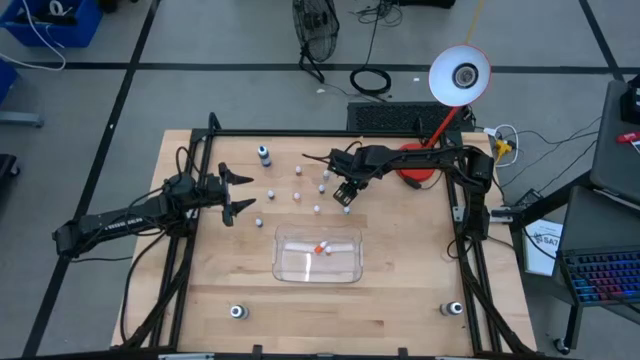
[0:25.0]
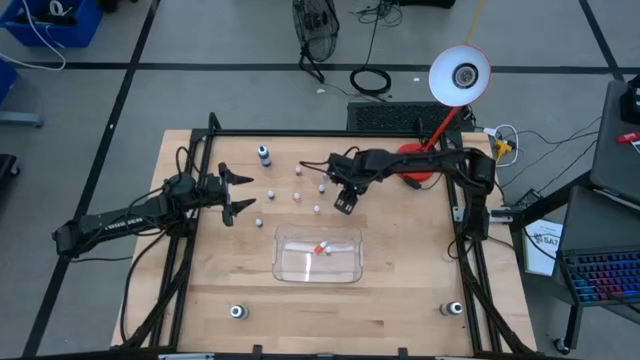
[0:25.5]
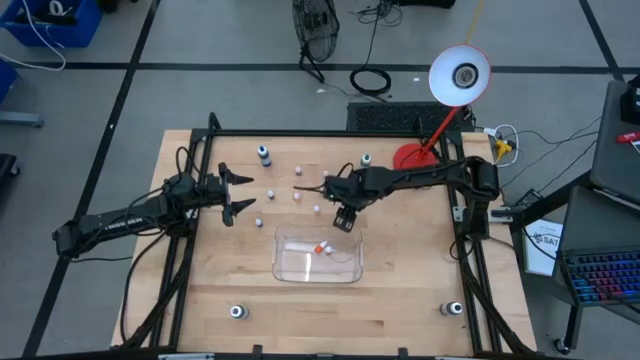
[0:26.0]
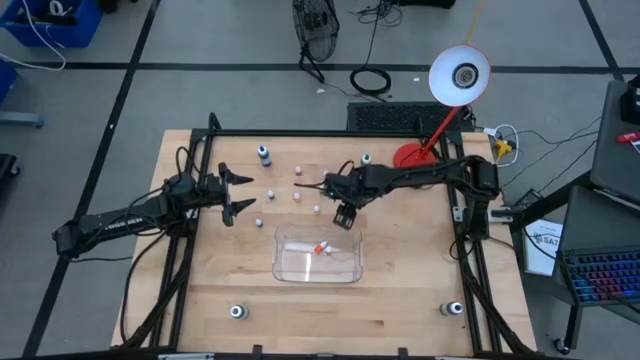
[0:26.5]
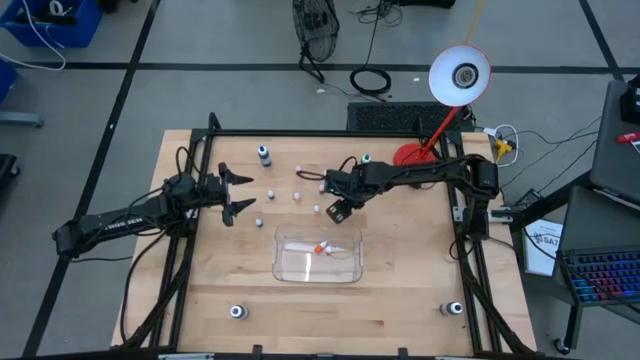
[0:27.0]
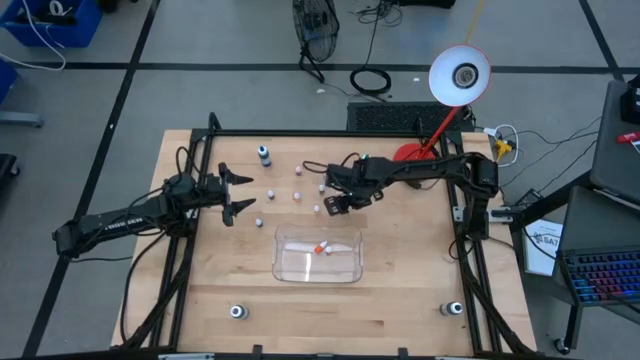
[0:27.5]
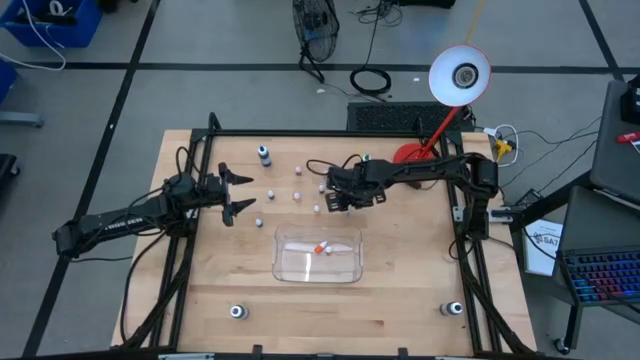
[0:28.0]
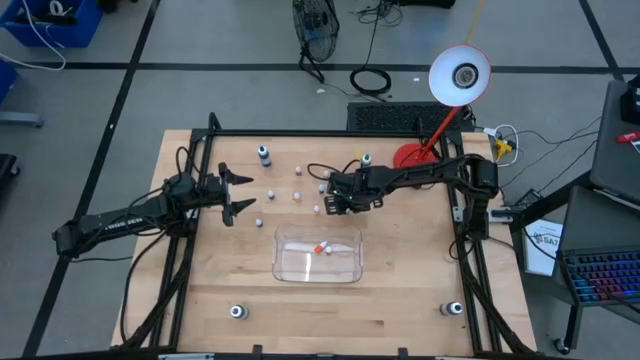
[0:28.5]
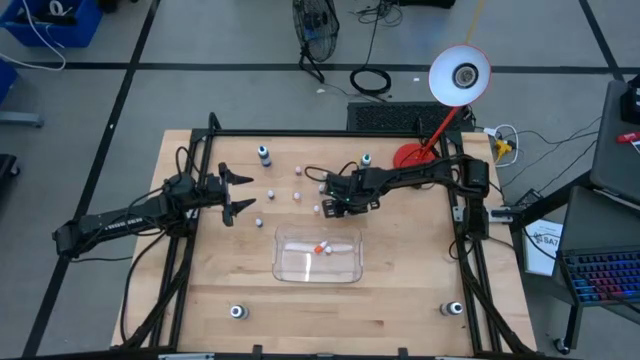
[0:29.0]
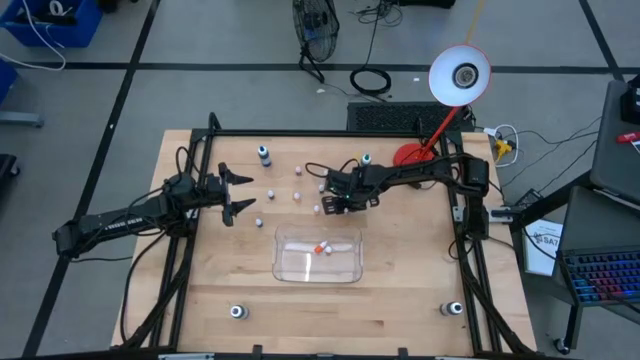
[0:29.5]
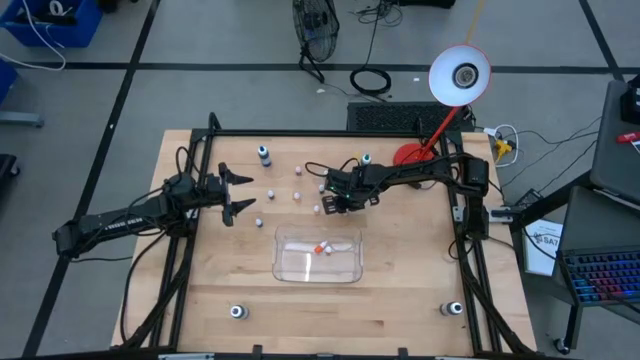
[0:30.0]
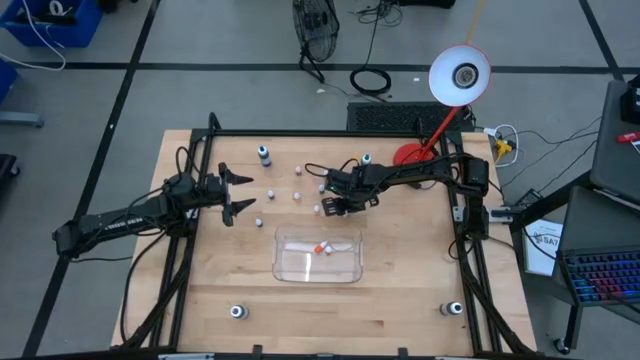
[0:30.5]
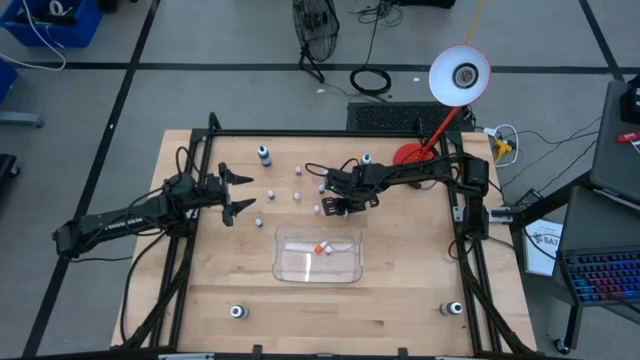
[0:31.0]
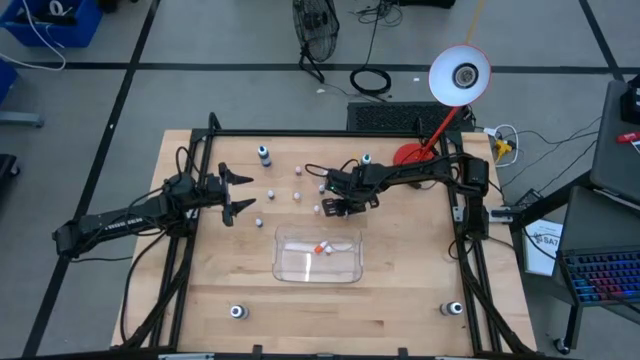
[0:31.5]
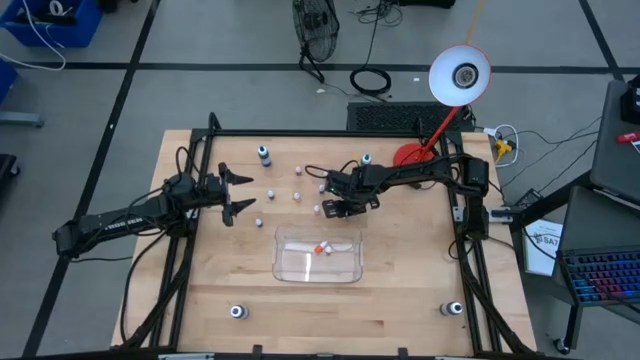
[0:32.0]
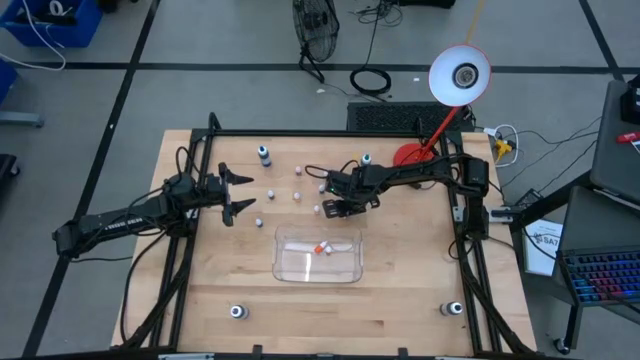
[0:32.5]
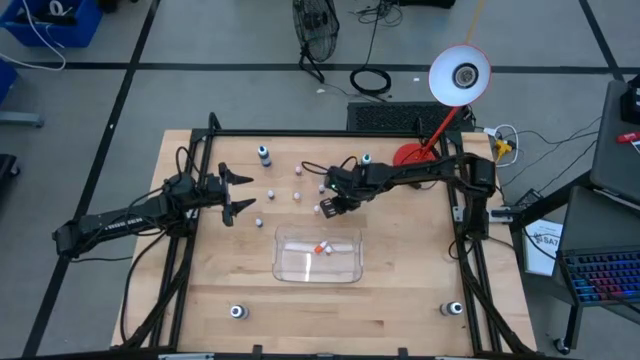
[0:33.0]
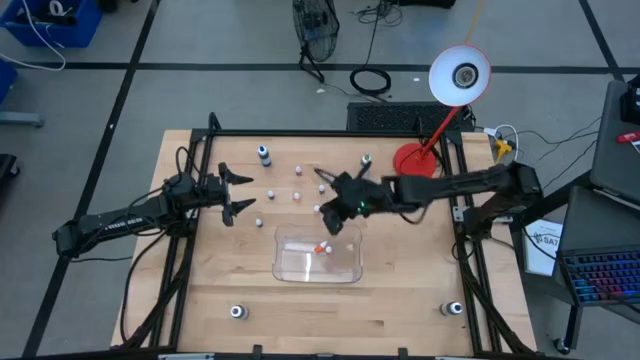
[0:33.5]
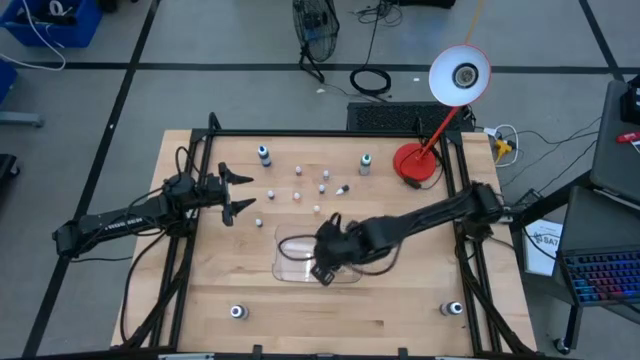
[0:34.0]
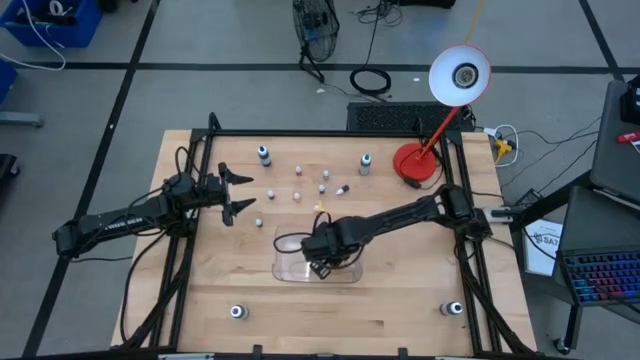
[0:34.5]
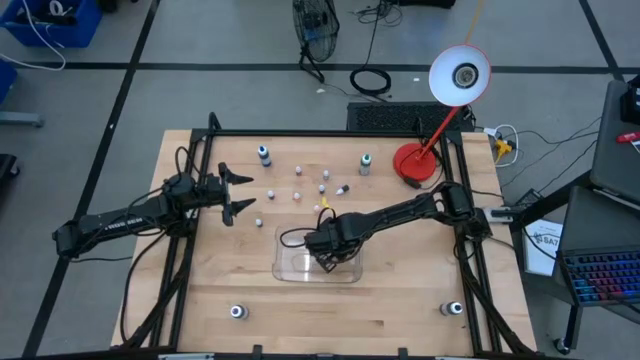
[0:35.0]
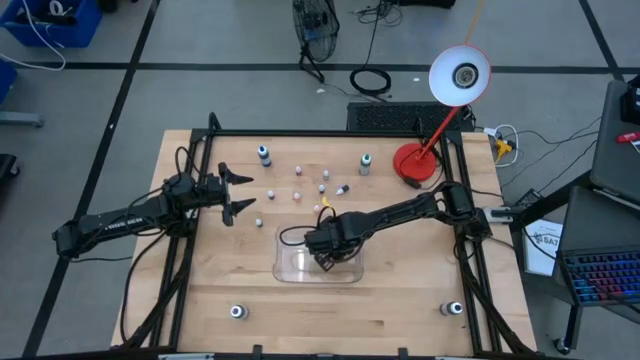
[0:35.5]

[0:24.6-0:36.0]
Task: Pick & Place food coloring
Put the small violet ood coloring bottle into the transparent bin

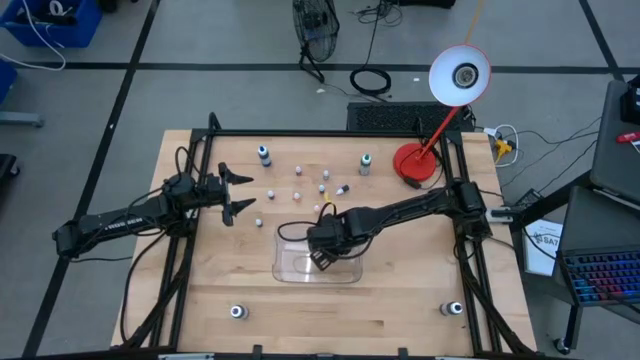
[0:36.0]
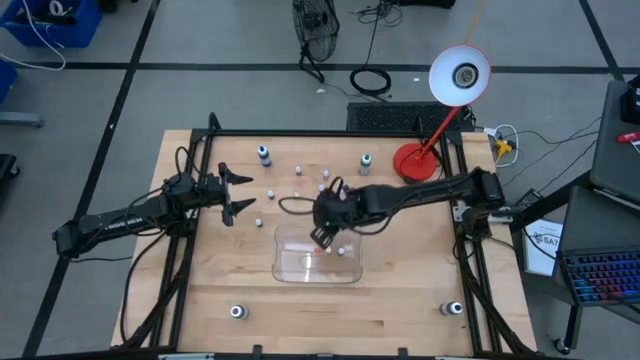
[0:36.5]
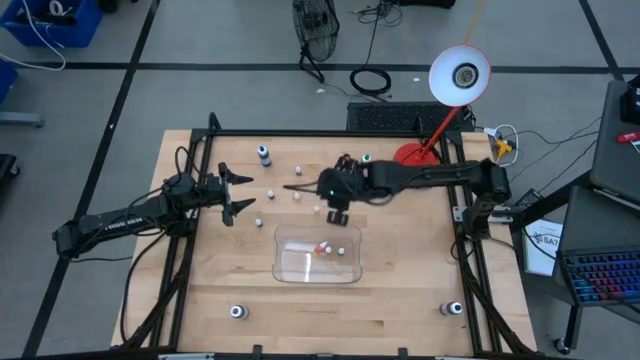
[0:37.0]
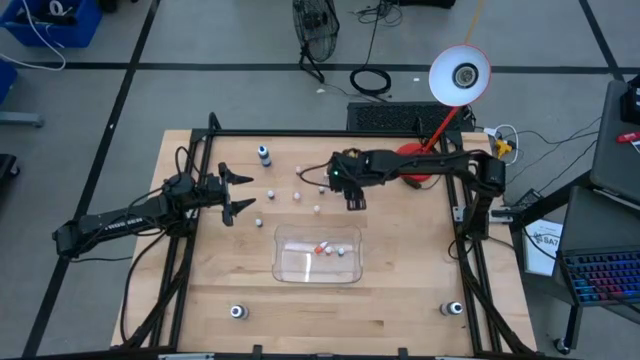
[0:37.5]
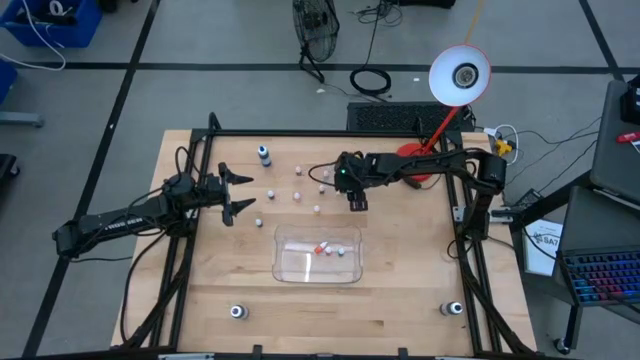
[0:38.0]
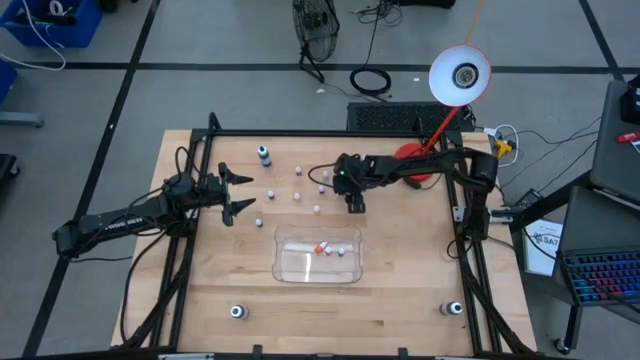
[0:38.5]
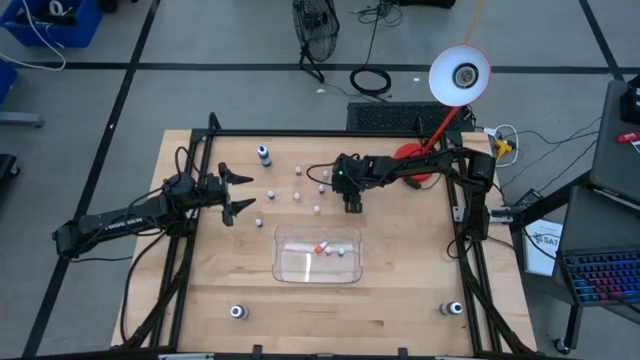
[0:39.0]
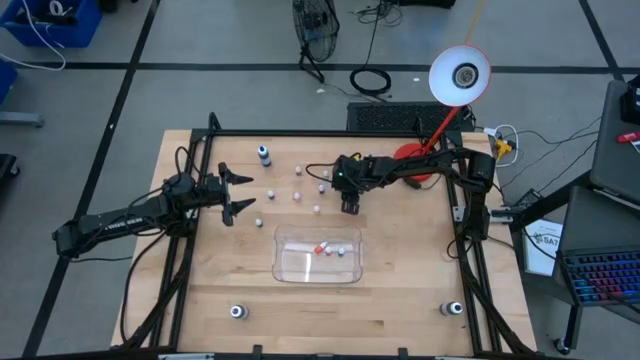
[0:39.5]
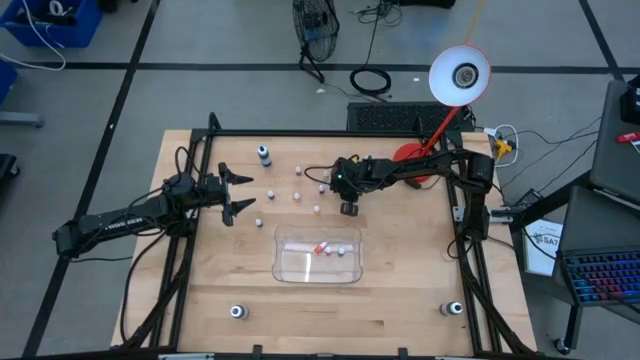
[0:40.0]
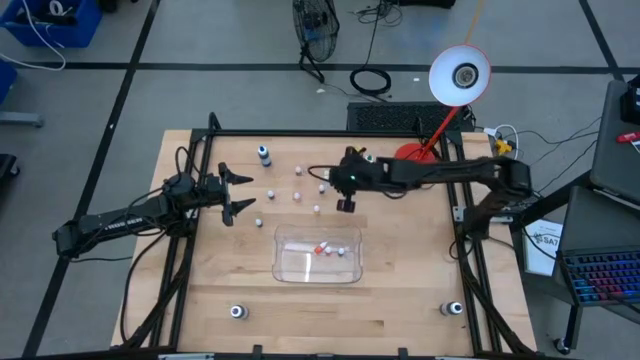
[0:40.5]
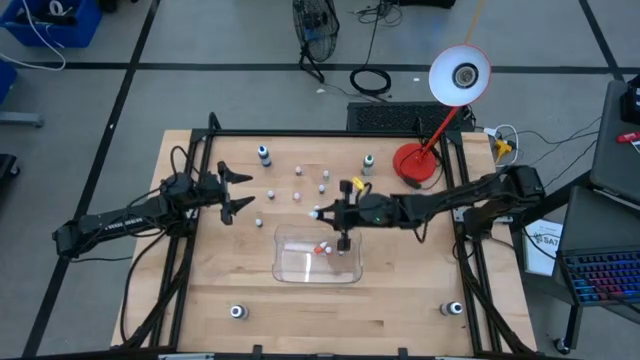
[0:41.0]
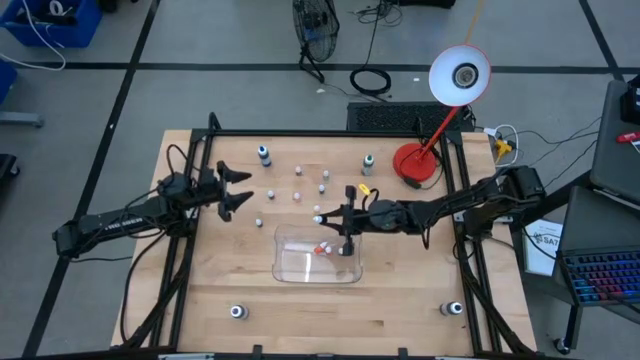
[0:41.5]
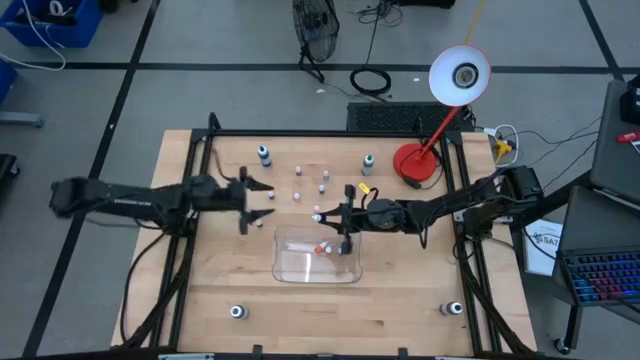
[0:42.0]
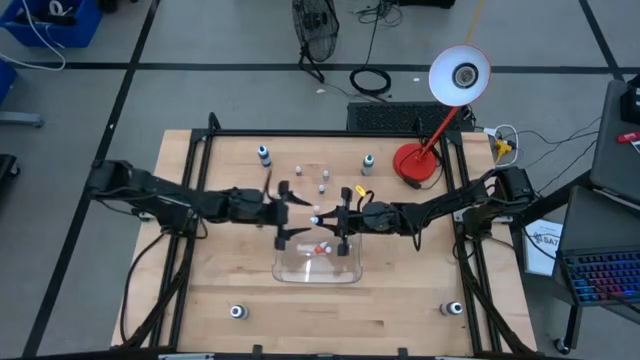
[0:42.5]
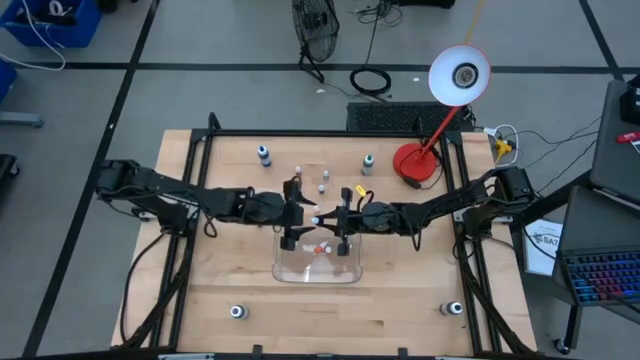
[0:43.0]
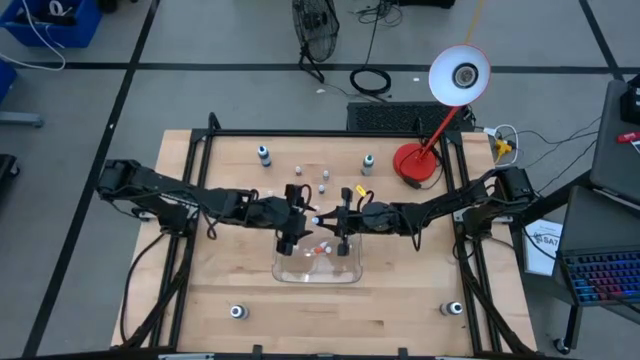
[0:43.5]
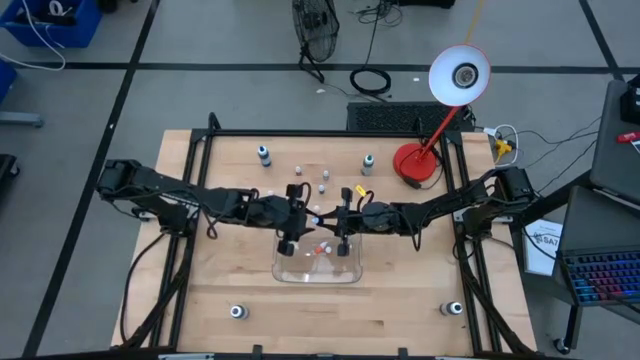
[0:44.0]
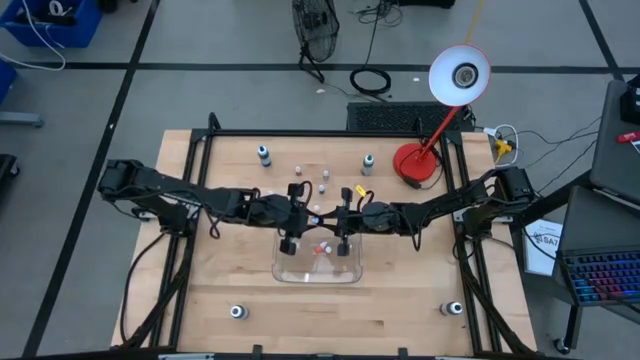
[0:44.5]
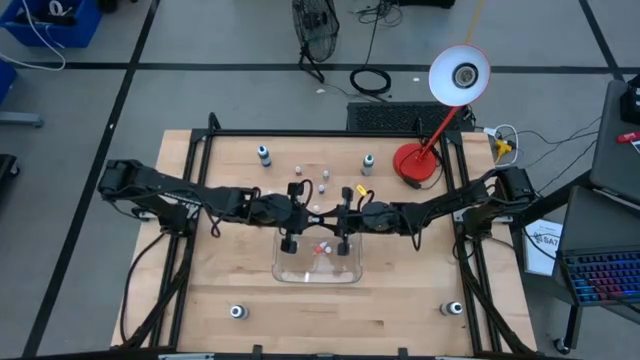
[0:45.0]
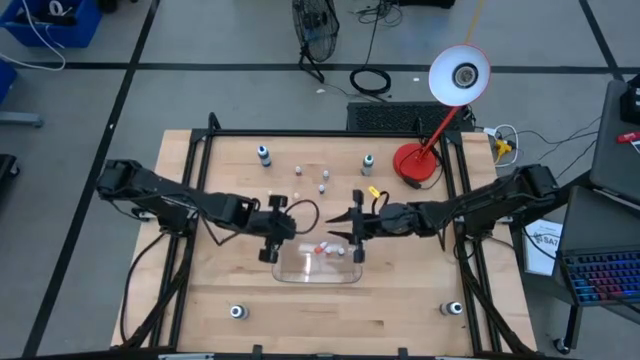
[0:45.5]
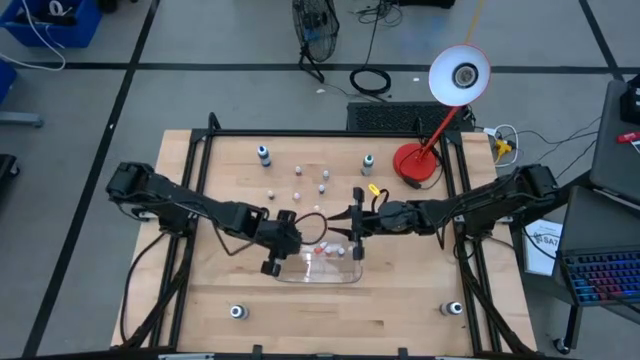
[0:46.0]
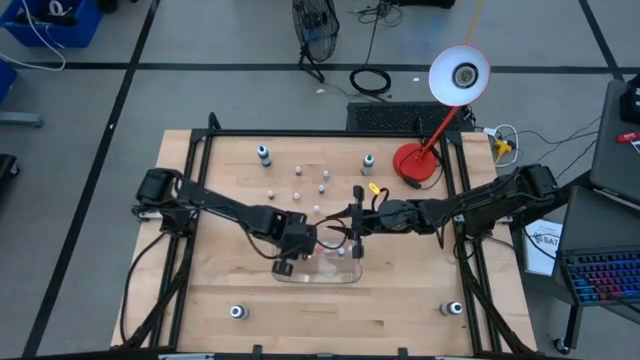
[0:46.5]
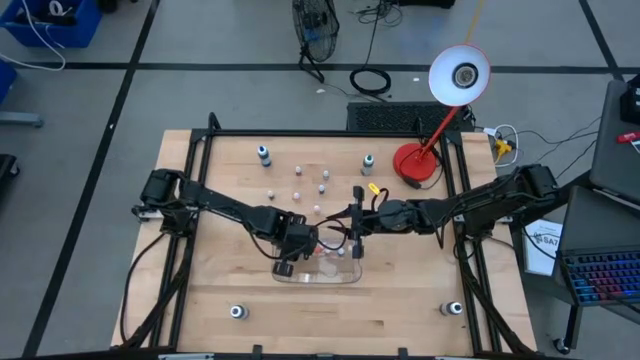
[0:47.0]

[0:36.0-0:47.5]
Put the small blue food coloring bottle into the transparent bin
